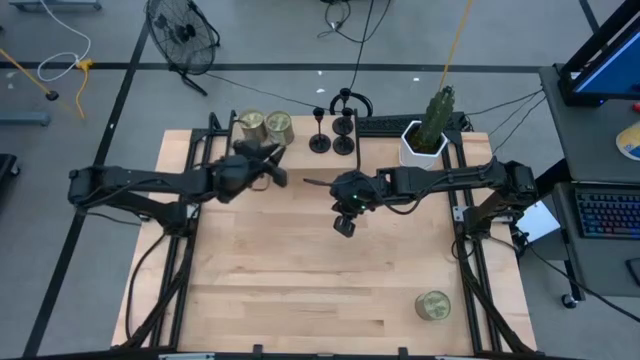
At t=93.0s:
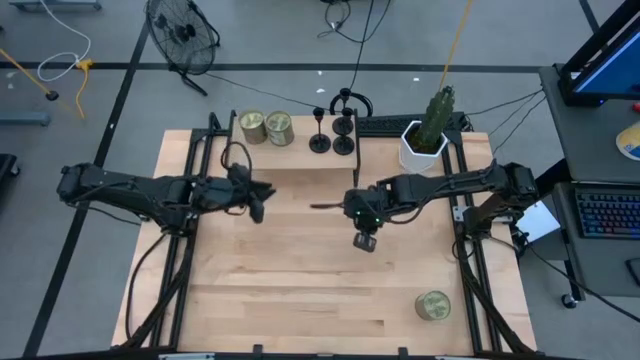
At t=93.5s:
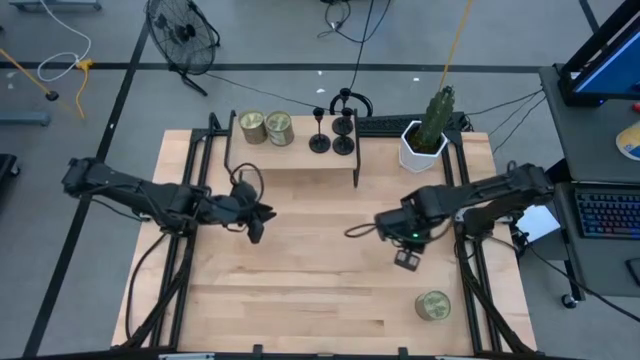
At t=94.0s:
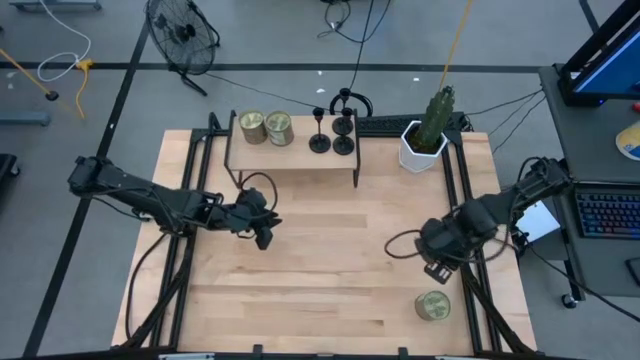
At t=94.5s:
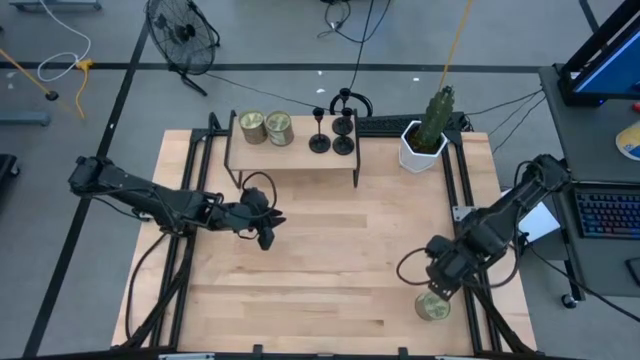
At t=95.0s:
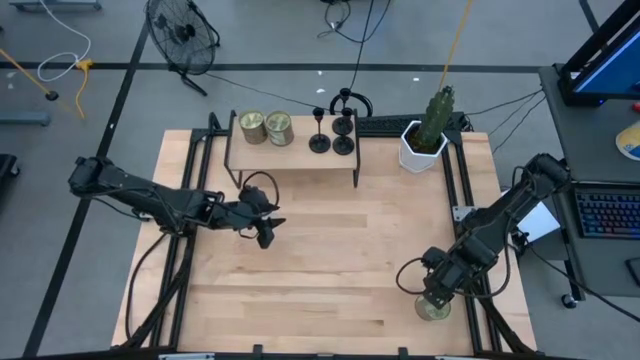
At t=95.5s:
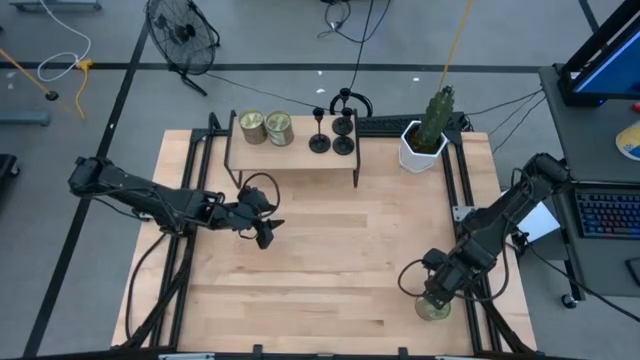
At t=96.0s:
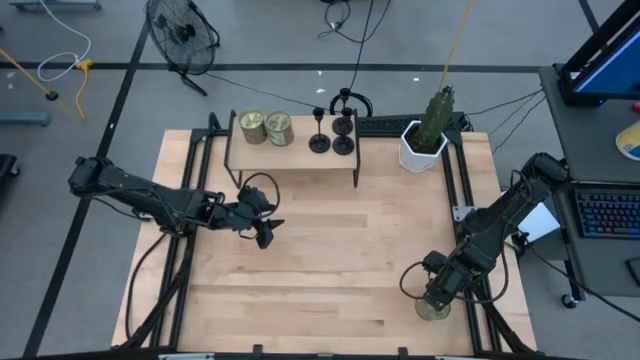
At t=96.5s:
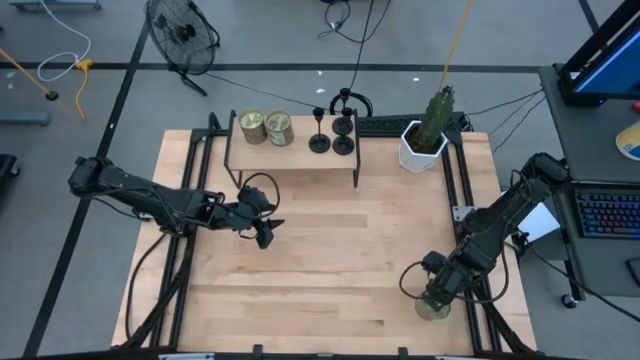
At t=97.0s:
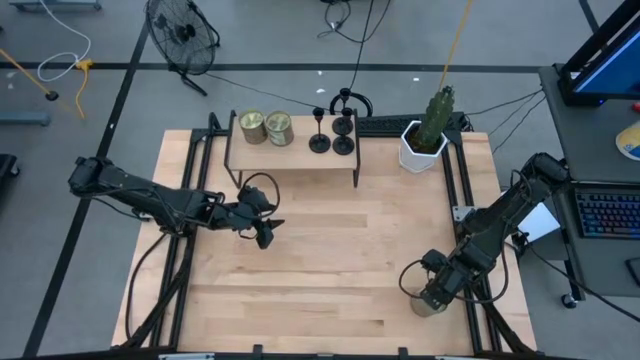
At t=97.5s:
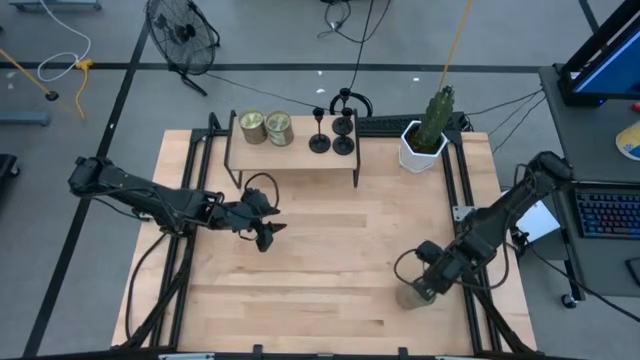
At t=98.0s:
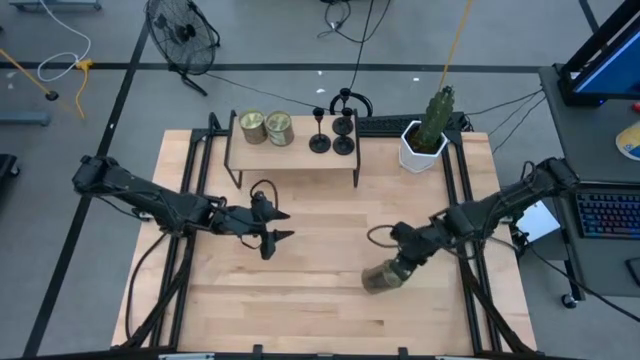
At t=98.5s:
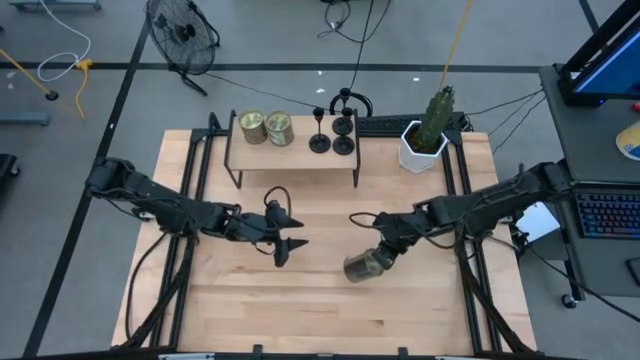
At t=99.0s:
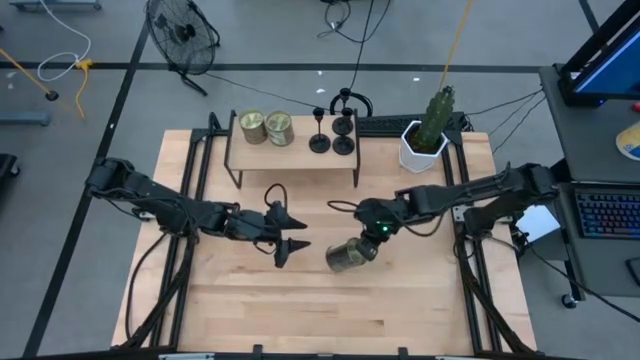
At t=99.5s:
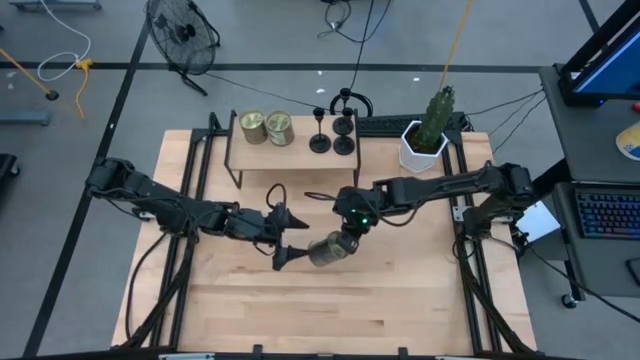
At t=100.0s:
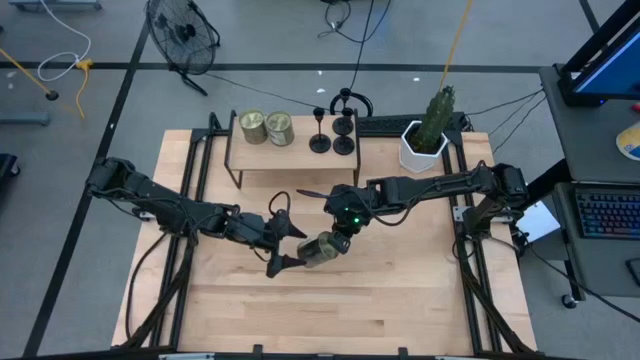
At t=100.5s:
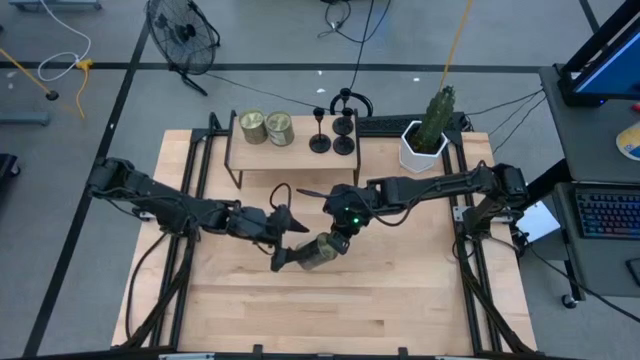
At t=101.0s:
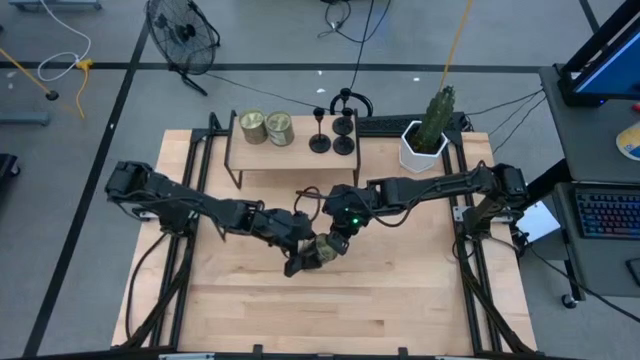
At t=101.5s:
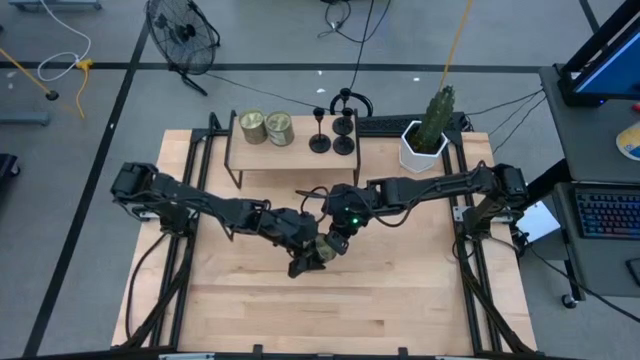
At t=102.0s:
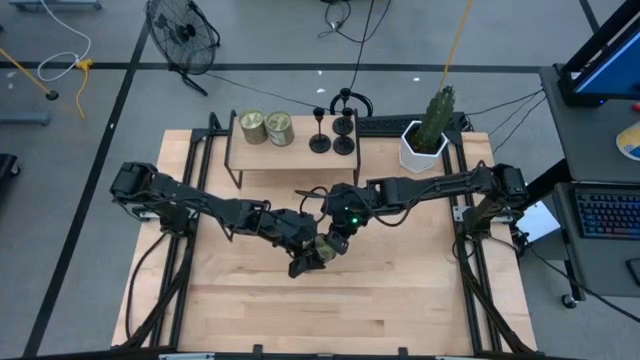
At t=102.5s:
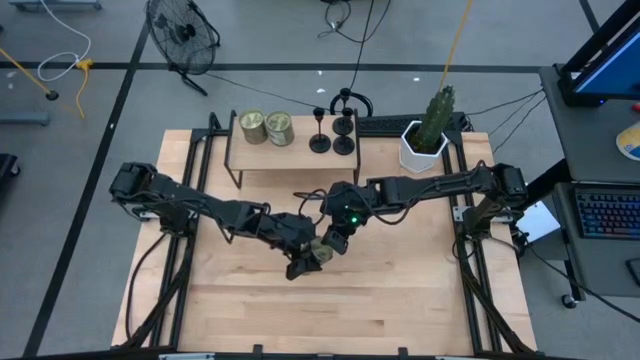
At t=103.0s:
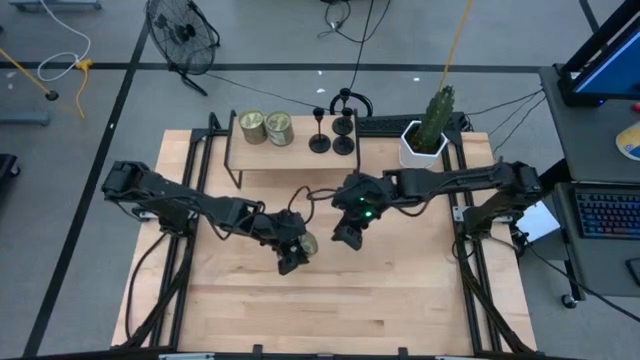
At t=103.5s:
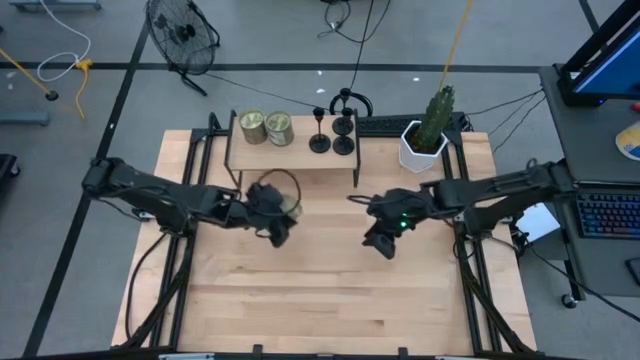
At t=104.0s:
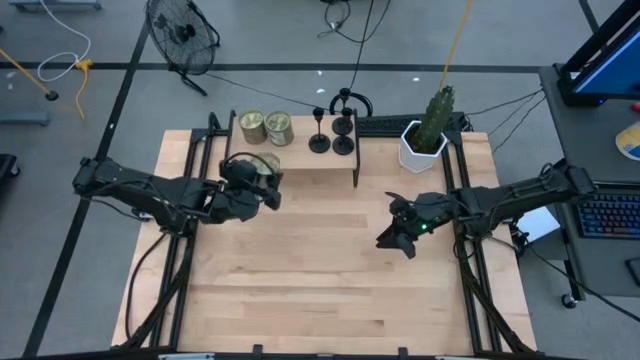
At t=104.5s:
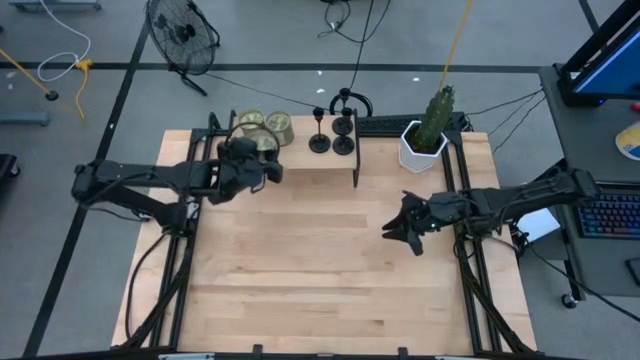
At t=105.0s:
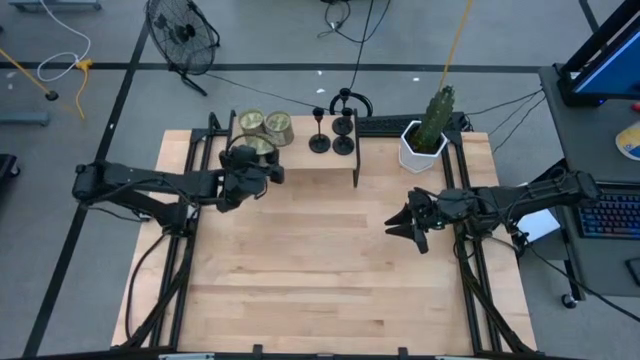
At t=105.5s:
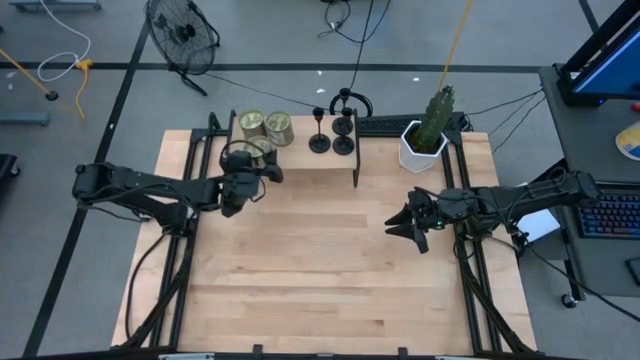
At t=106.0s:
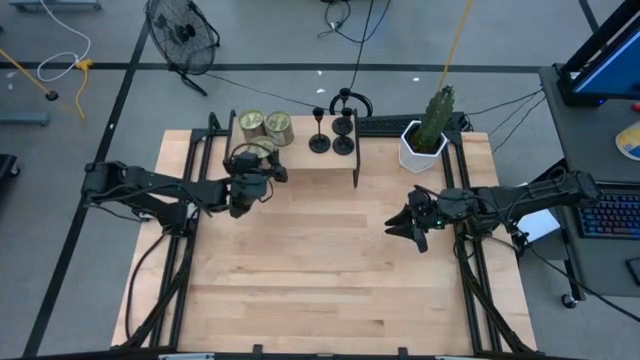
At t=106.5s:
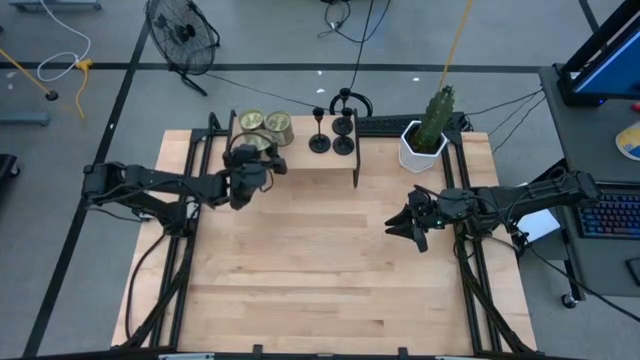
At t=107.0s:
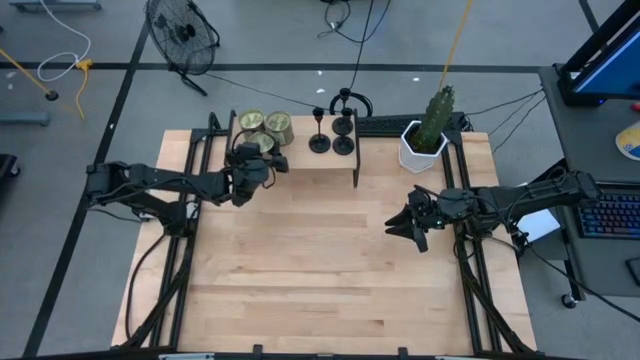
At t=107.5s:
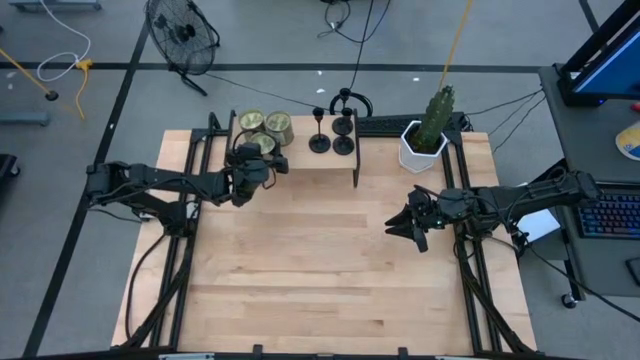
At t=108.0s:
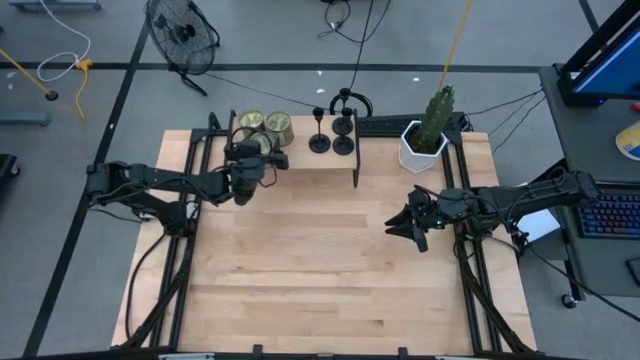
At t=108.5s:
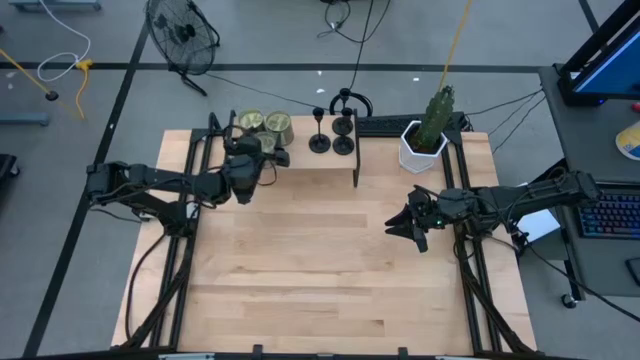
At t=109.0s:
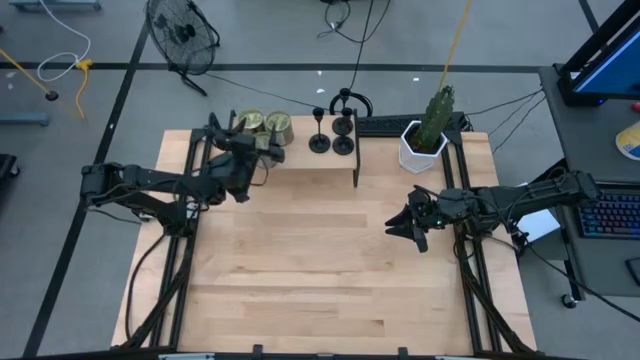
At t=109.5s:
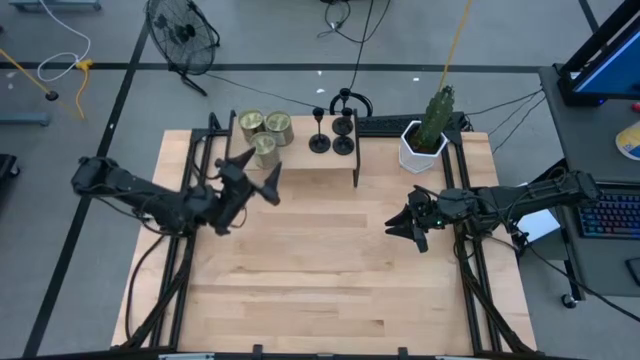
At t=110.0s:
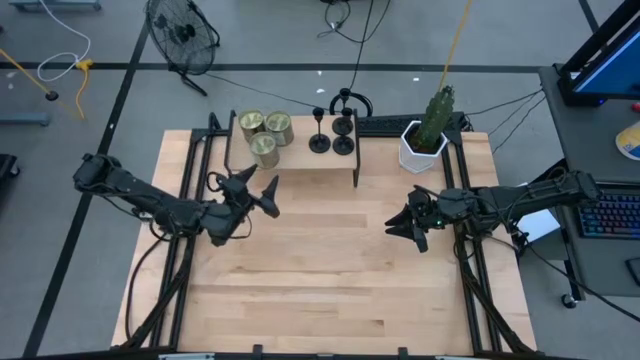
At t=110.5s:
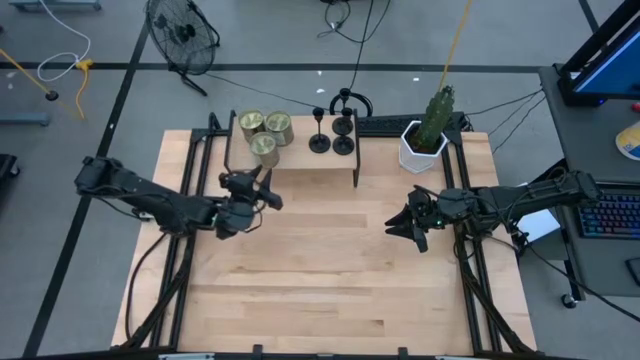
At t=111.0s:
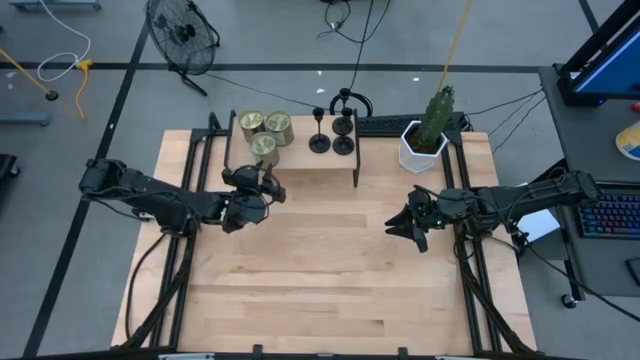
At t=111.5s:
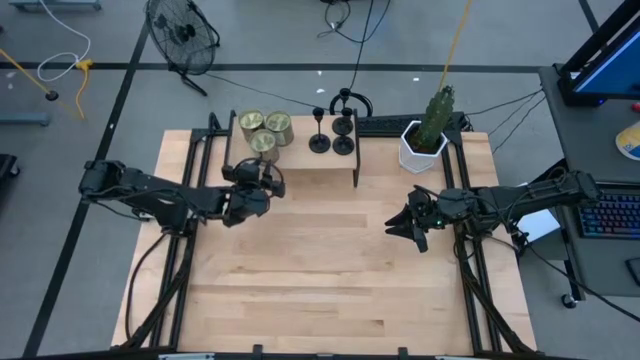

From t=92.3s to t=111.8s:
Task: Pick & Place candle stick holders
Put the scented candle on the shelf

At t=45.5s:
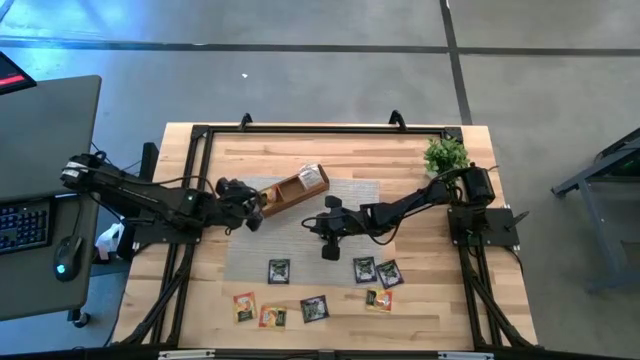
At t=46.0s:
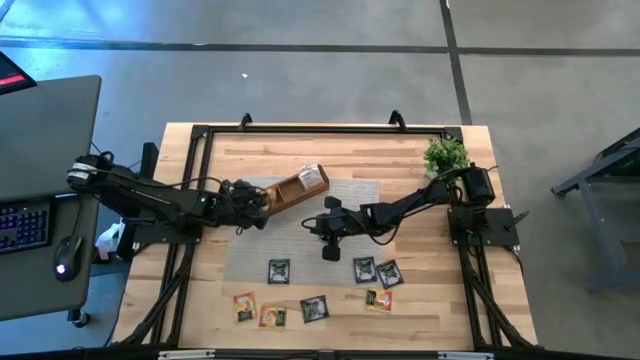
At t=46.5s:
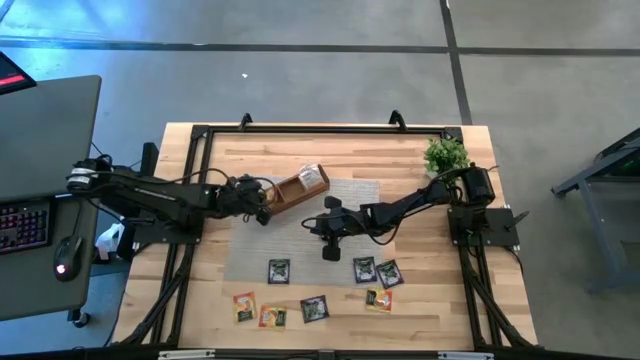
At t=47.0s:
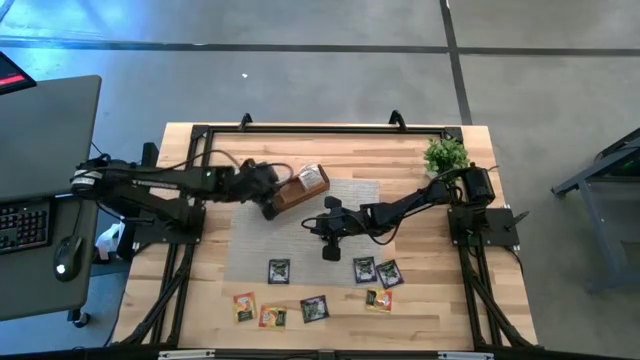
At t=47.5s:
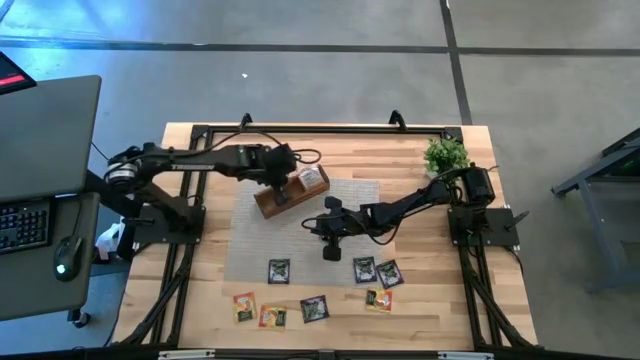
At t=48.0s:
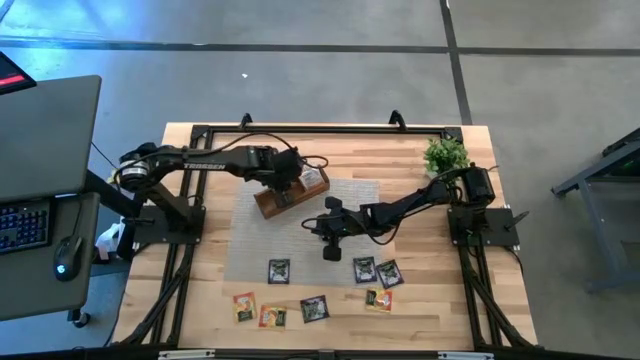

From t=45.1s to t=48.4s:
Task: Pick & Place Tea
Put the yellow tea bag into the middle section of the wooden organizer
